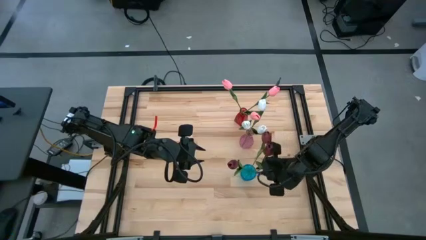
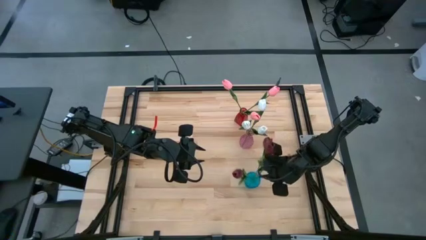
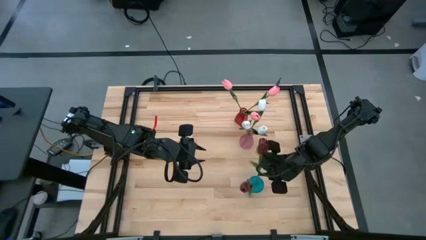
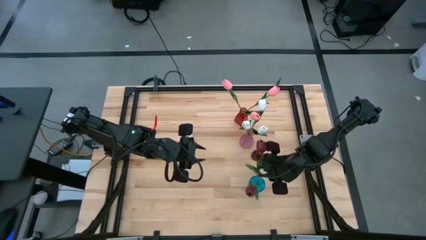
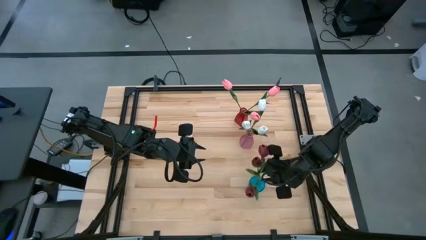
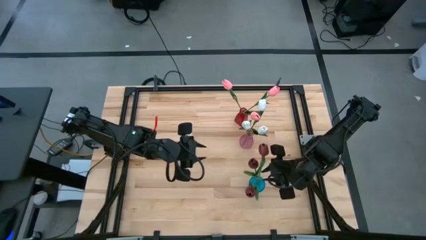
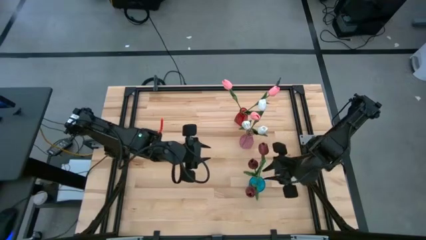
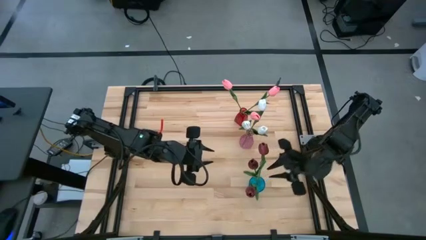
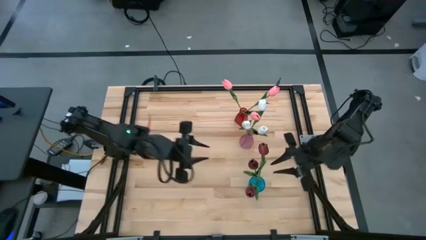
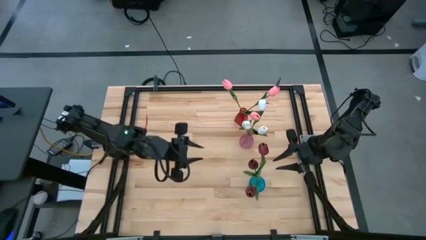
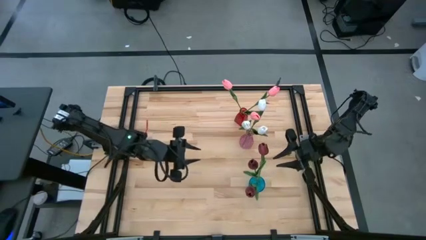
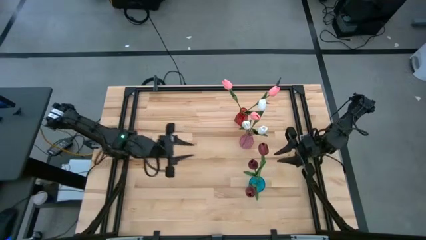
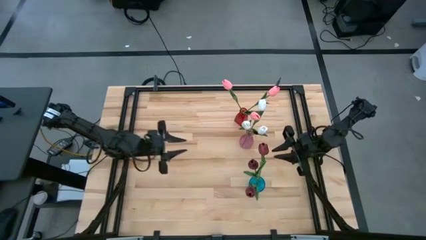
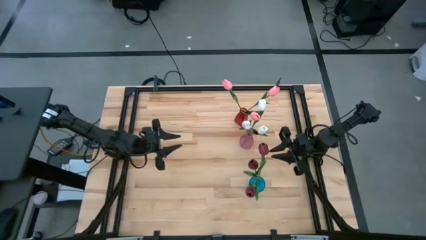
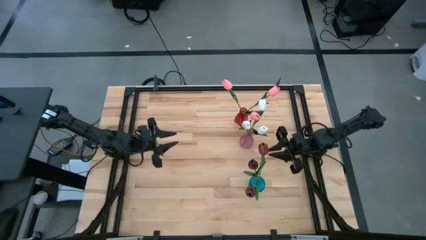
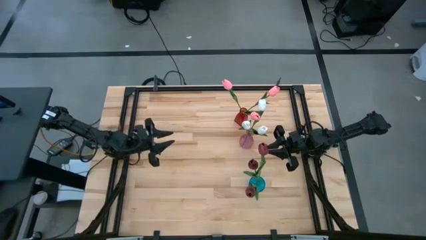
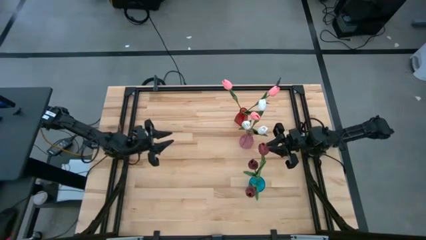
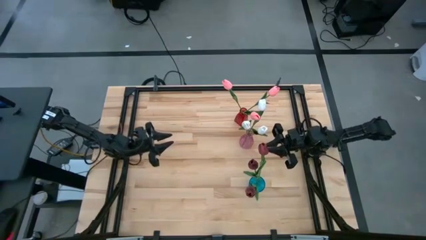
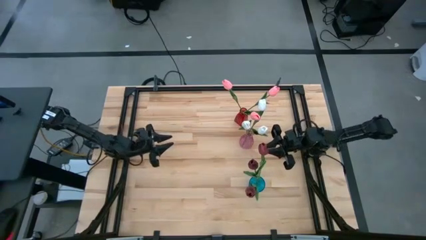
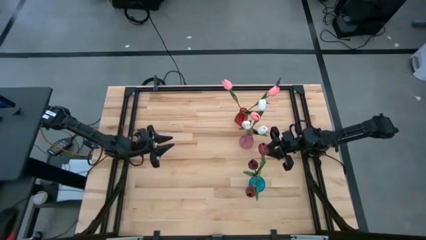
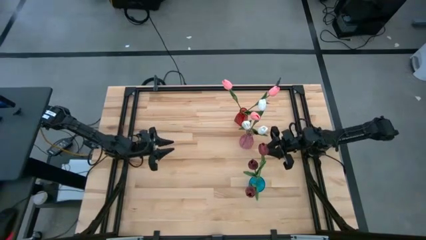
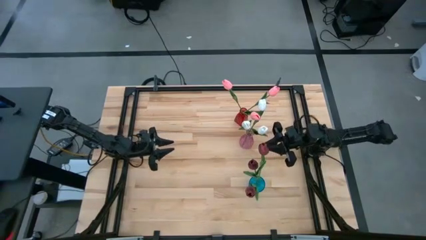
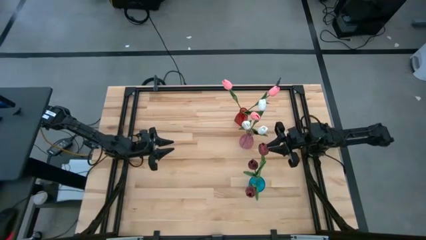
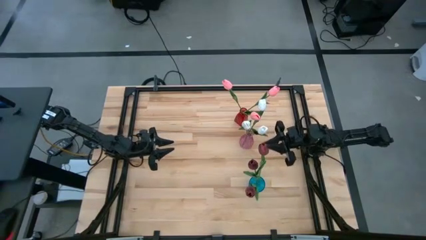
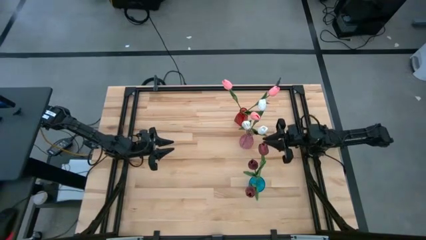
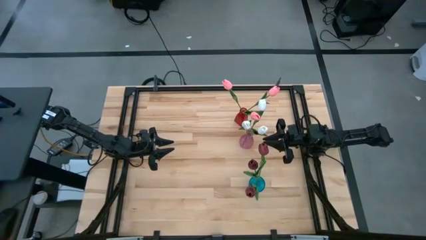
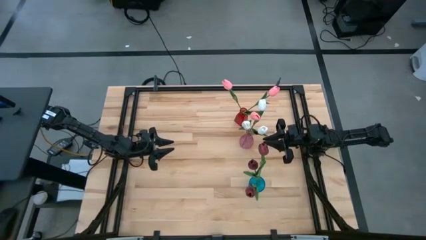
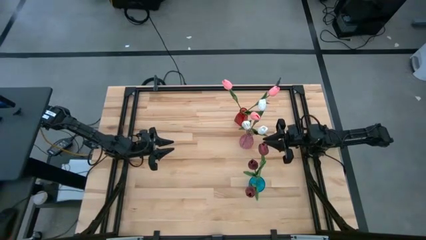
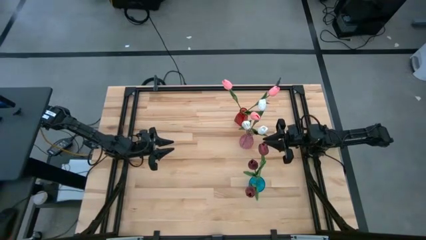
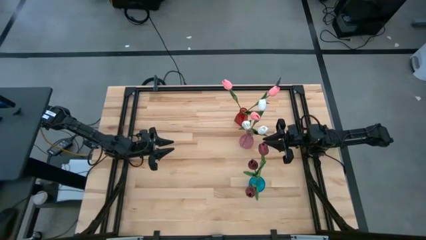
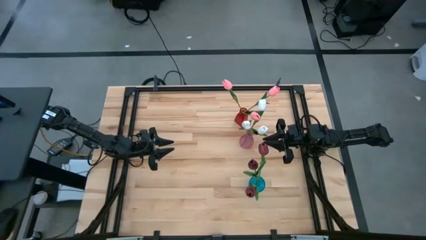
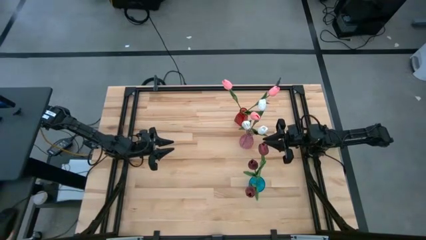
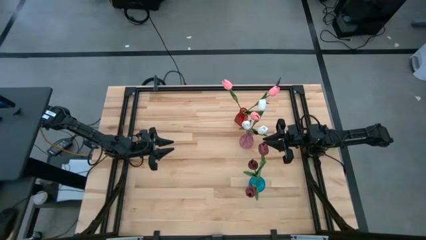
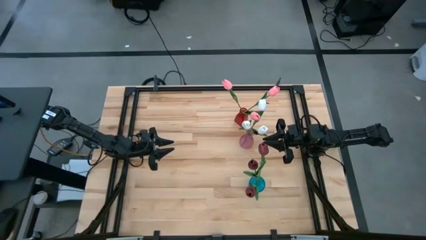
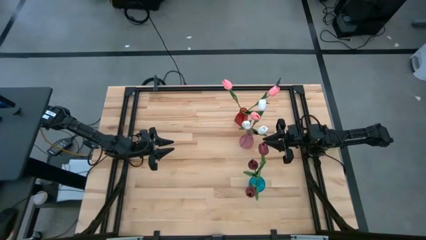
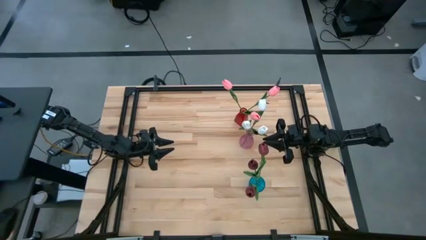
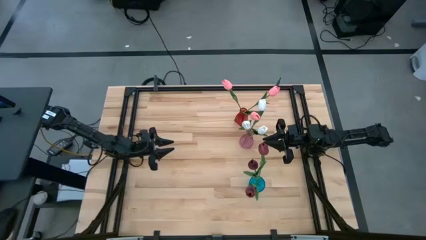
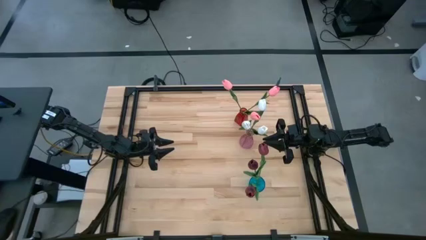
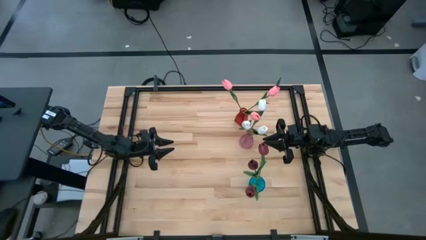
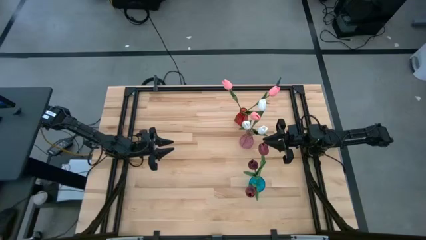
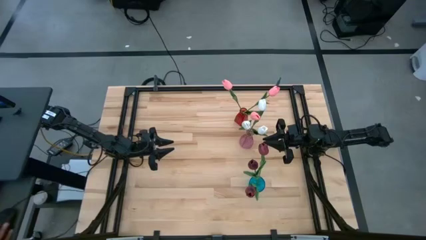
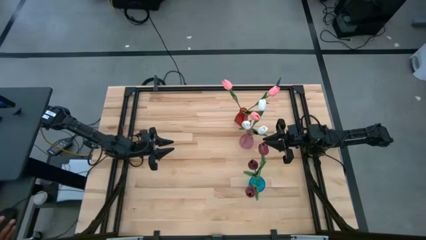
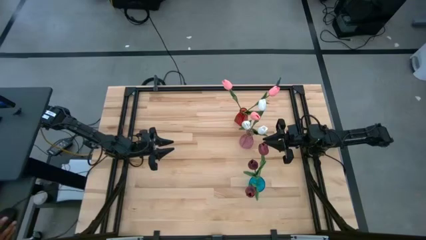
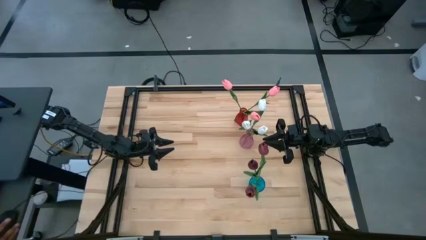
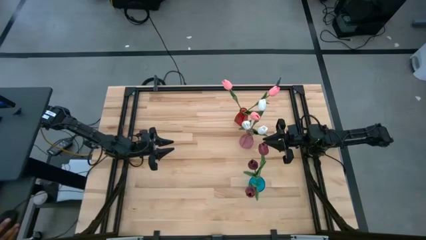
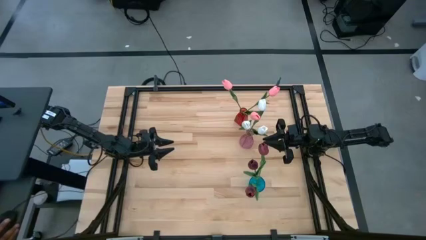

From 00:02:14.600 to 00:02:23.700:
Task: Sort flowers into vase by color
Return to Home Position

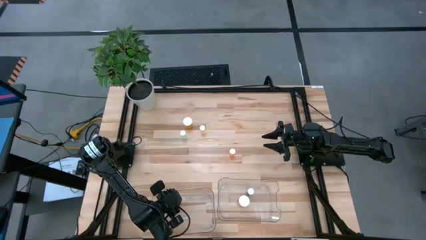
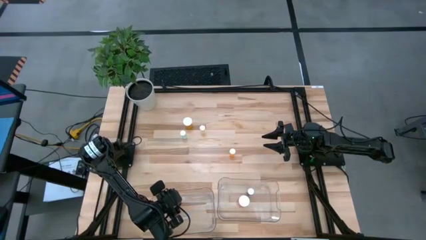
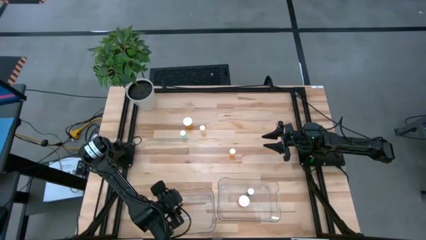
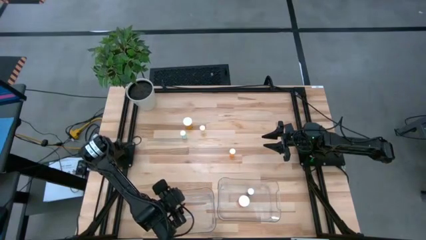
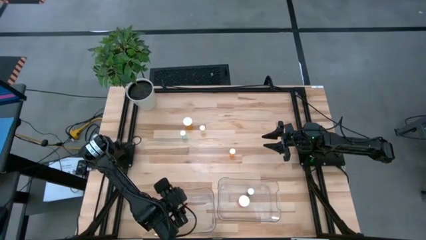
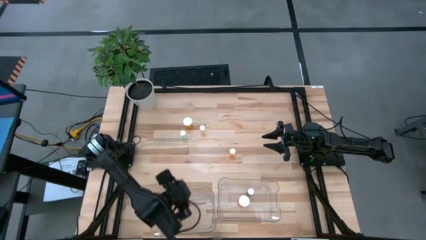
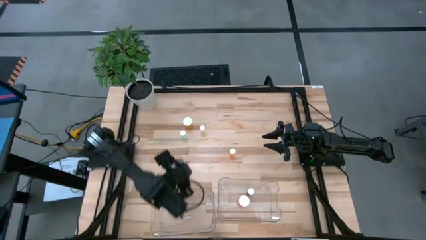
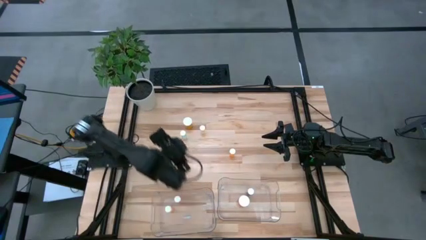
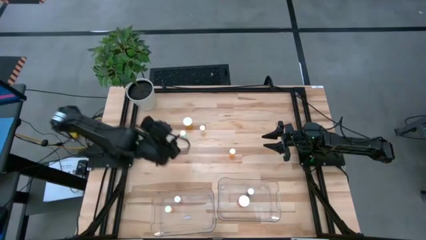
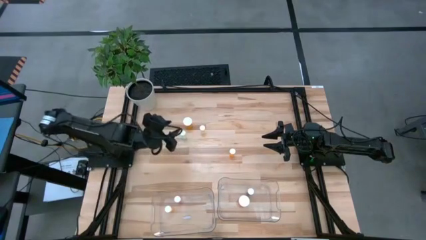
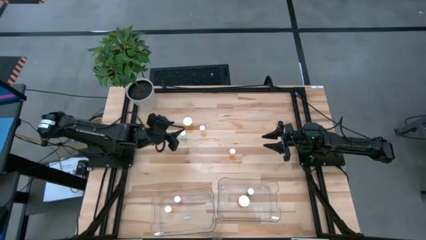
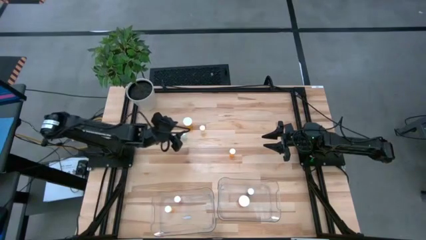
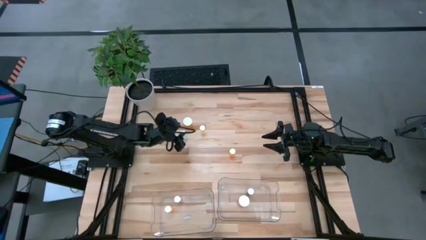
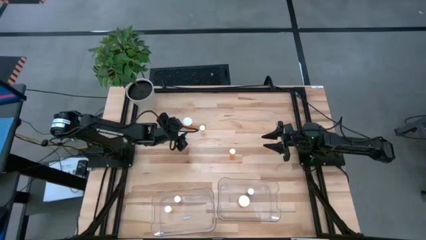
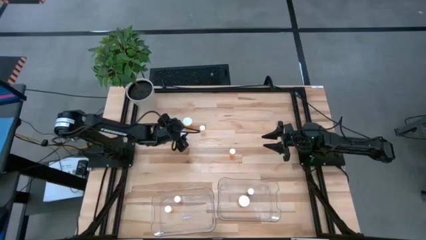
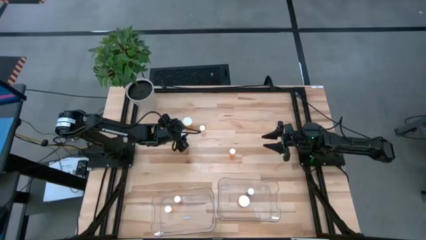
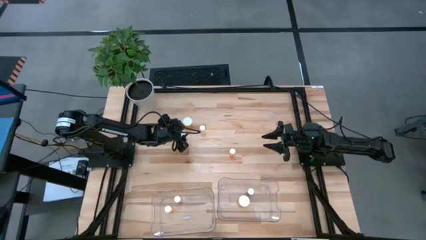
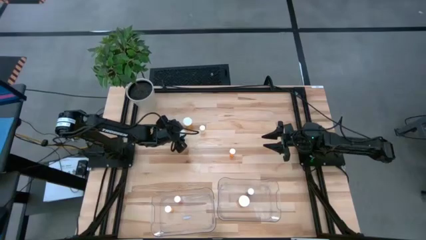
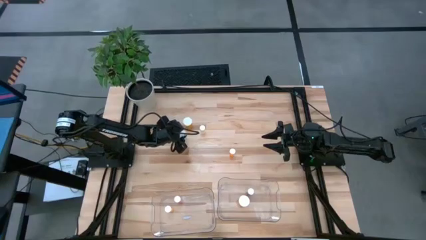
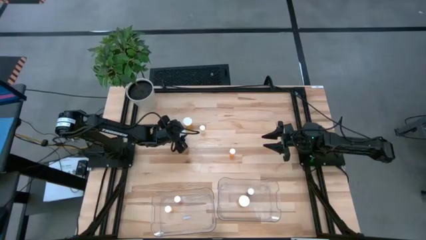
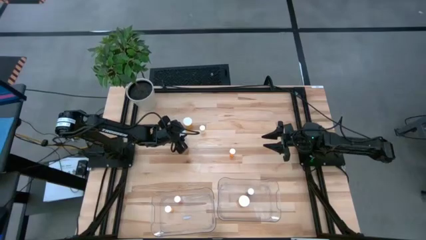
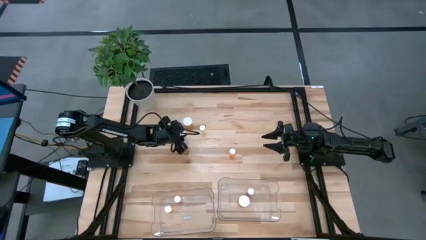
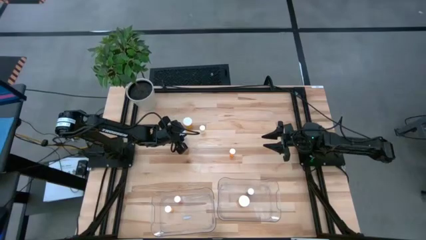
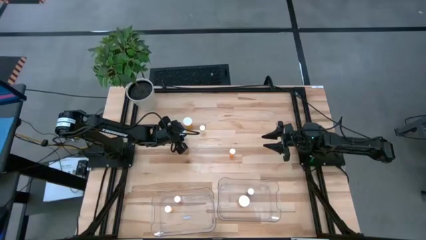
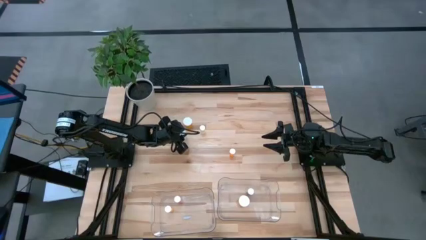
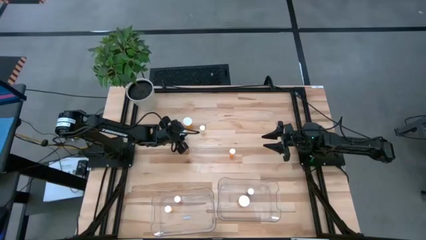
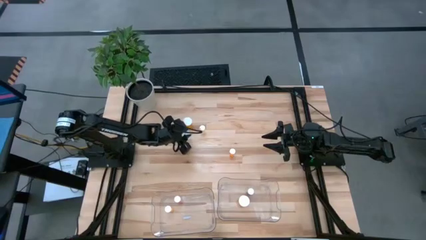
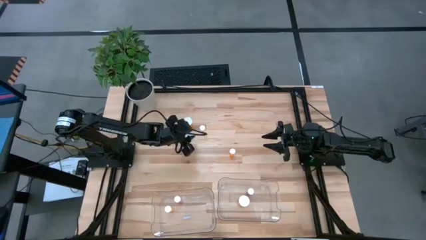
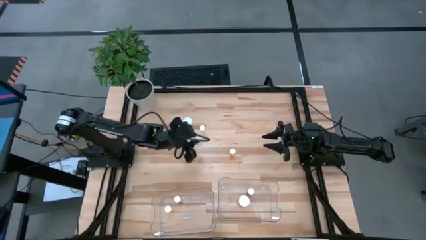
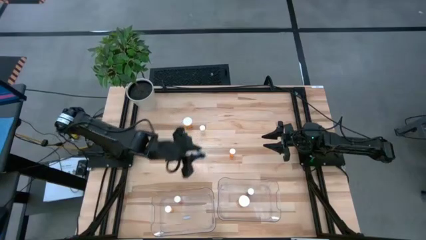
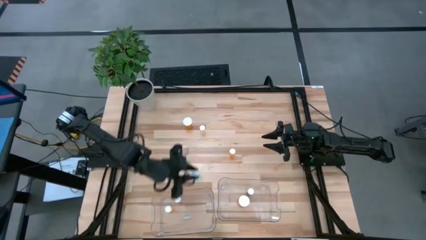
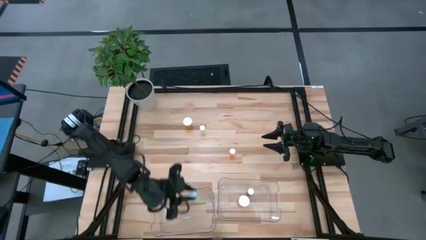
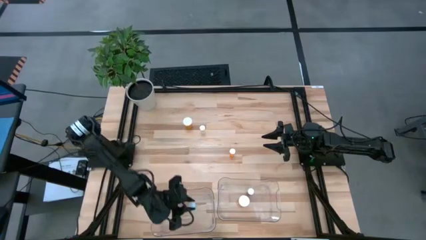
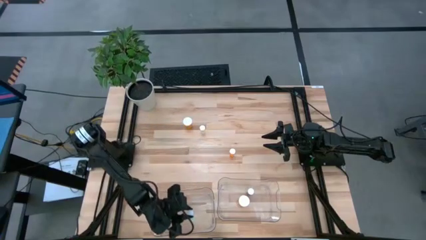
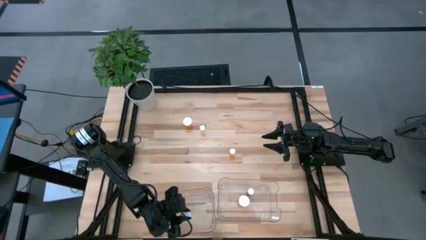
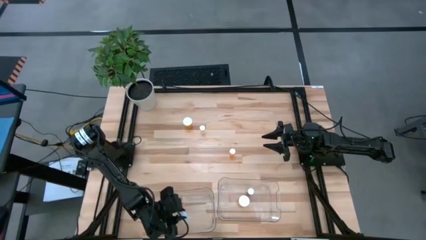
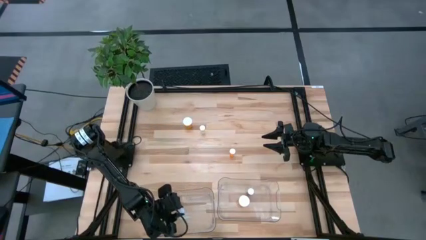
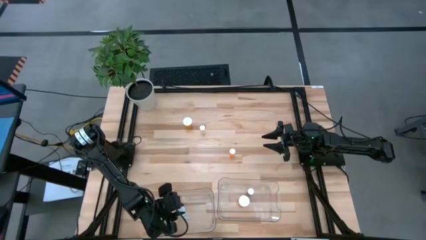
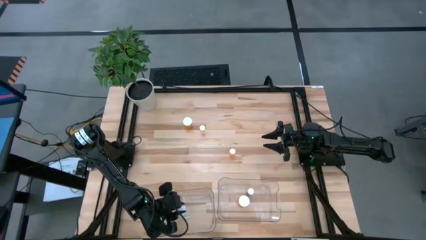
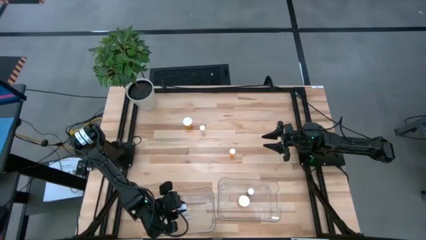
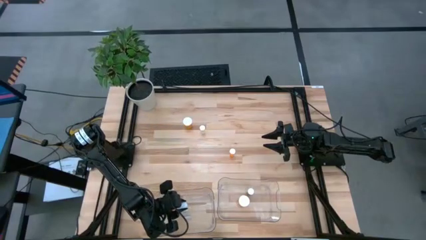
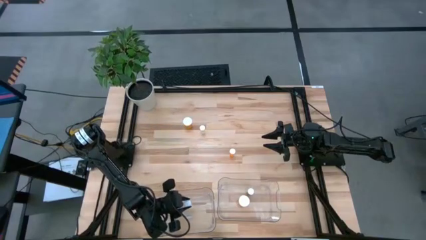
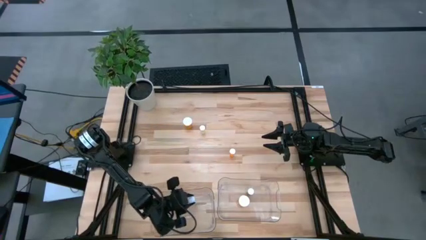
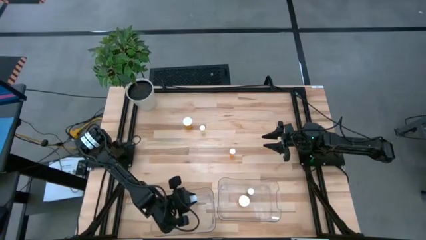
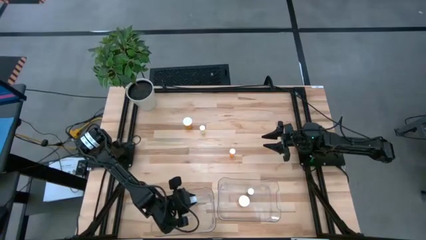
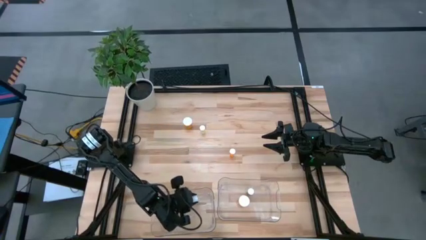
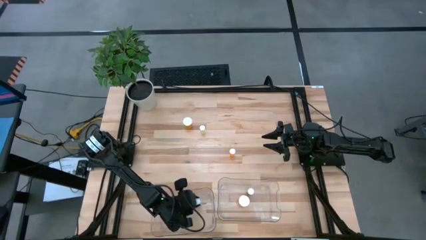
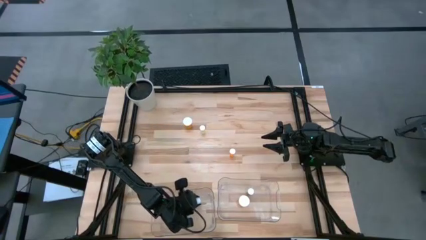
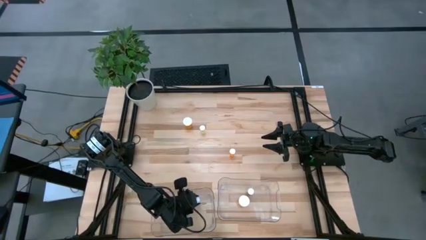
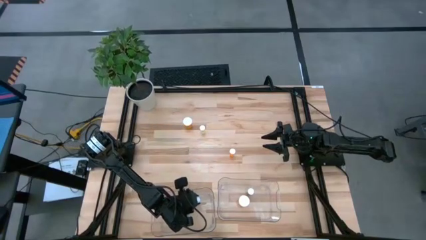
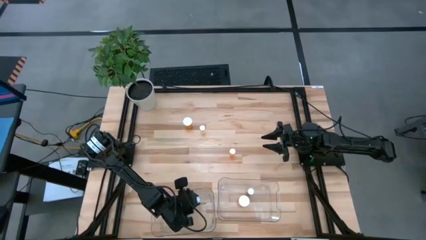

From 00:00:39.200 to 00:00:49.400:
Task: Pick and place medicine bottles into bin by pill shape (circle, oval)
Put the green tablet bottle into the left transparent bin
